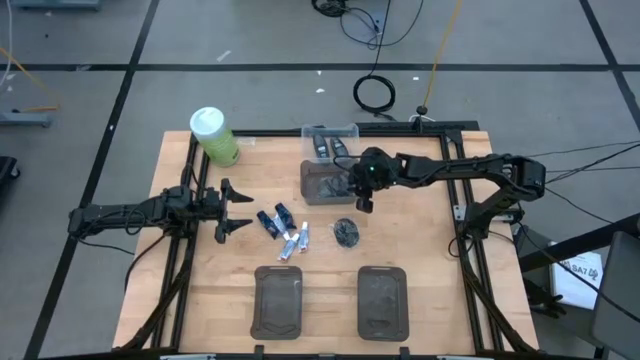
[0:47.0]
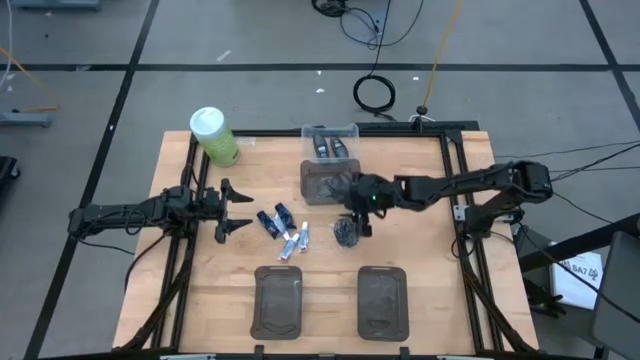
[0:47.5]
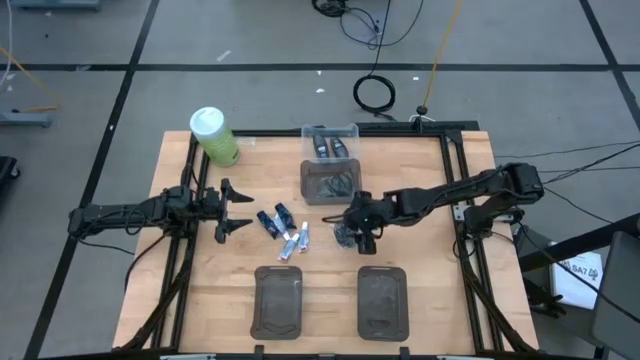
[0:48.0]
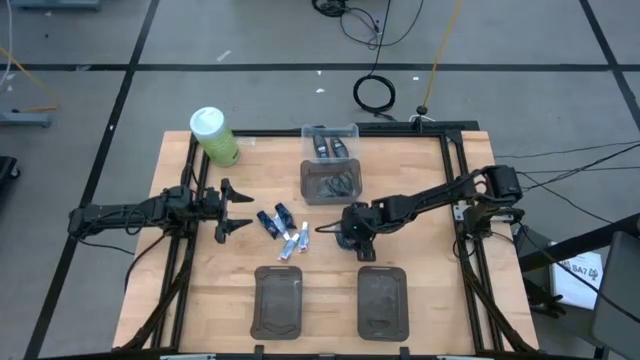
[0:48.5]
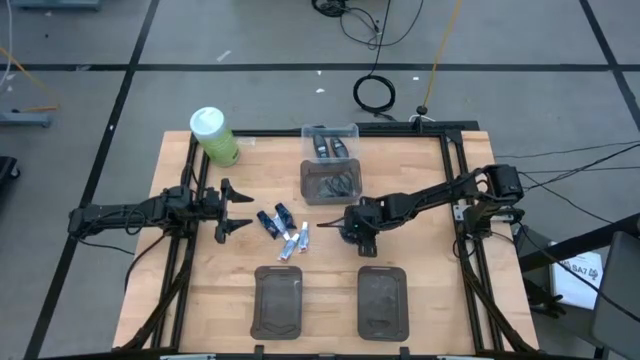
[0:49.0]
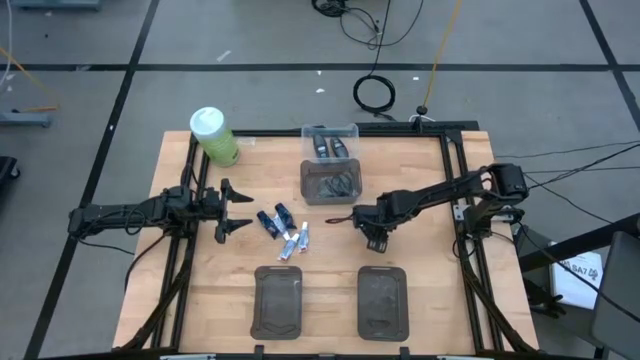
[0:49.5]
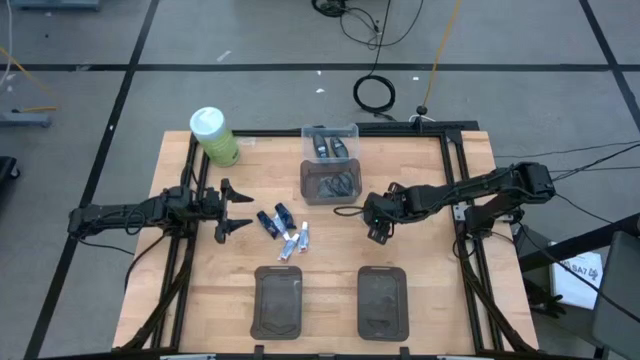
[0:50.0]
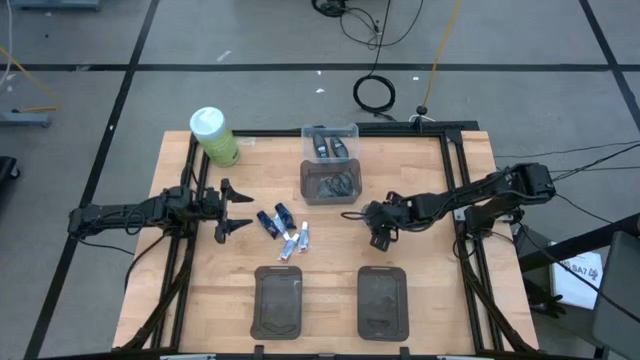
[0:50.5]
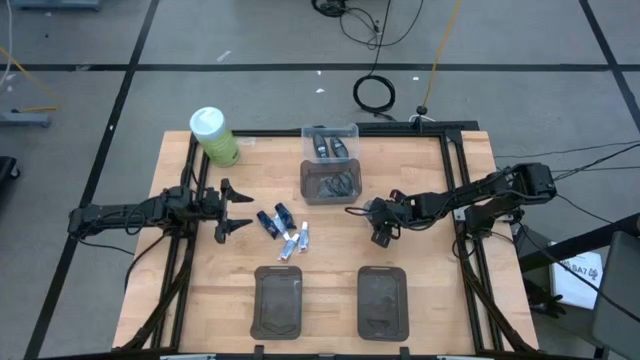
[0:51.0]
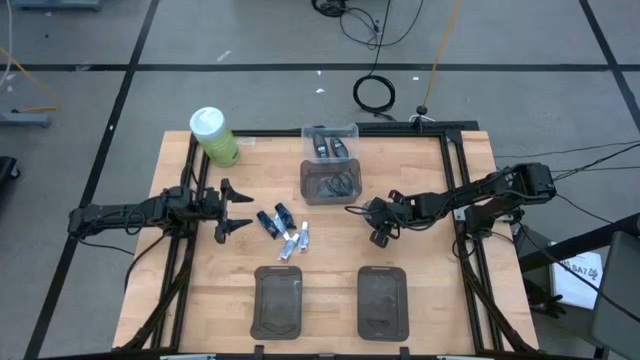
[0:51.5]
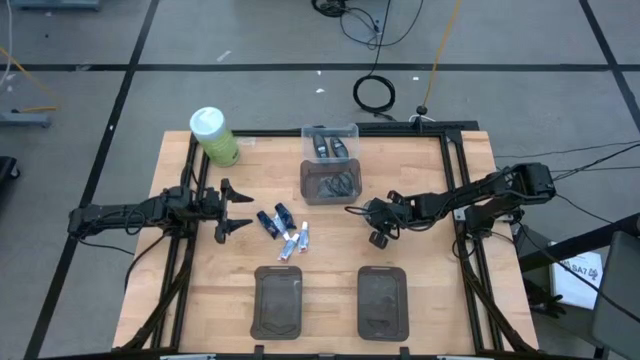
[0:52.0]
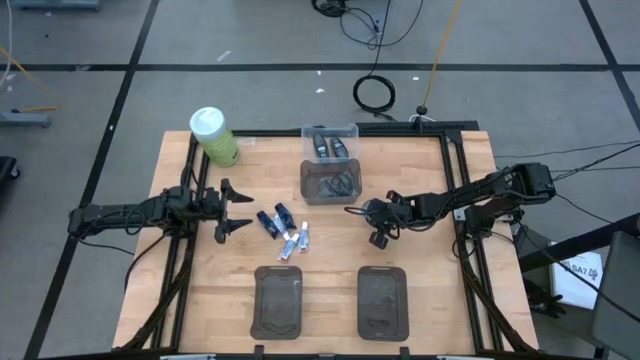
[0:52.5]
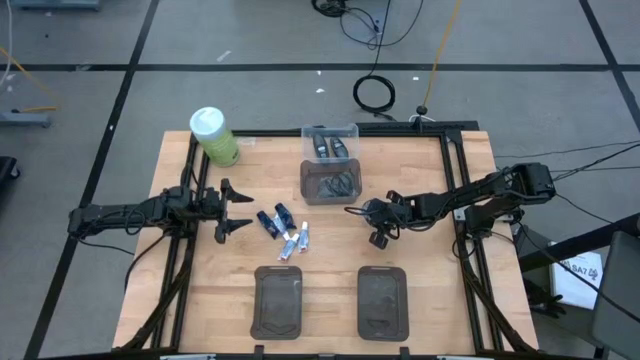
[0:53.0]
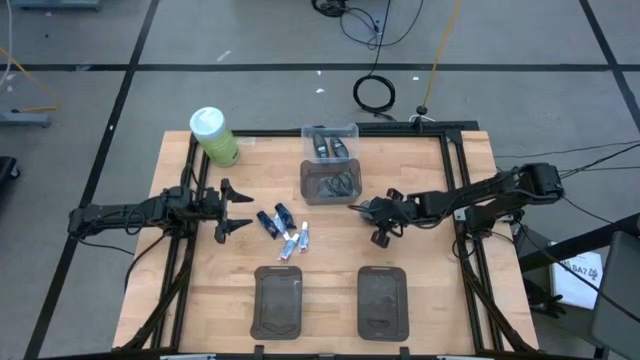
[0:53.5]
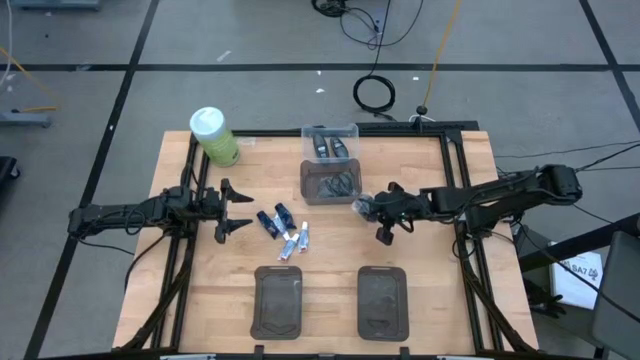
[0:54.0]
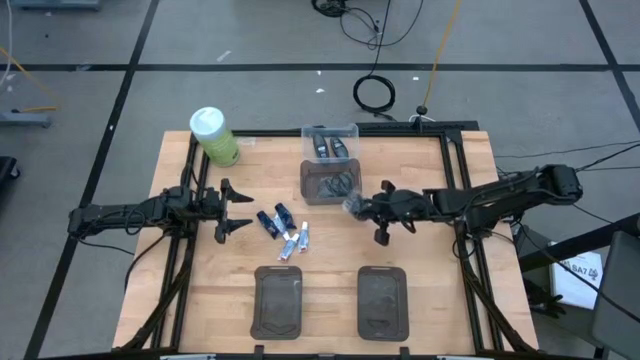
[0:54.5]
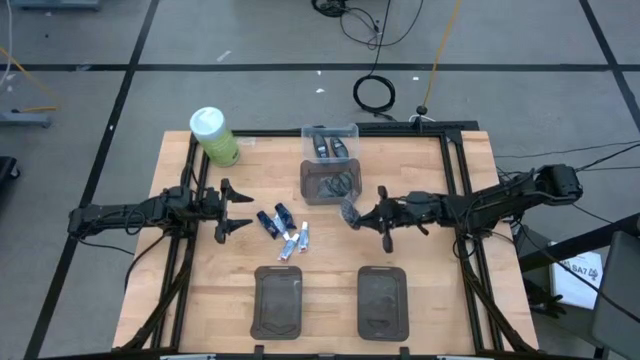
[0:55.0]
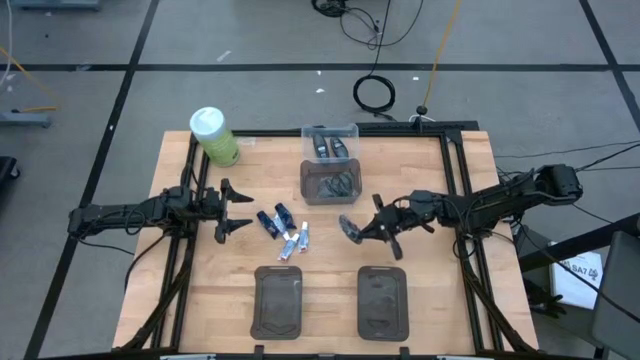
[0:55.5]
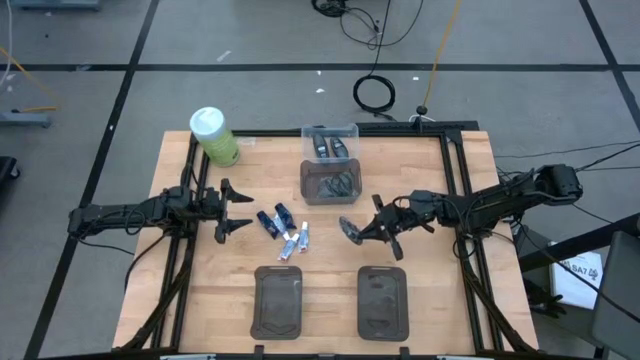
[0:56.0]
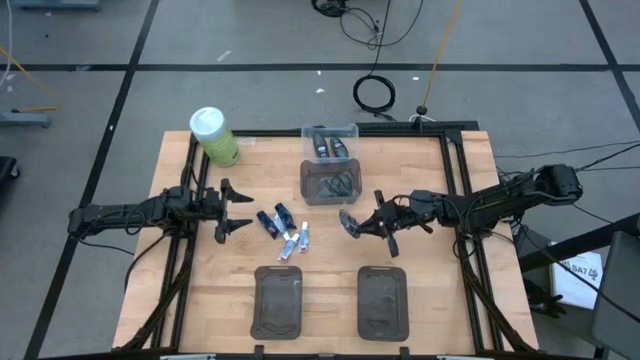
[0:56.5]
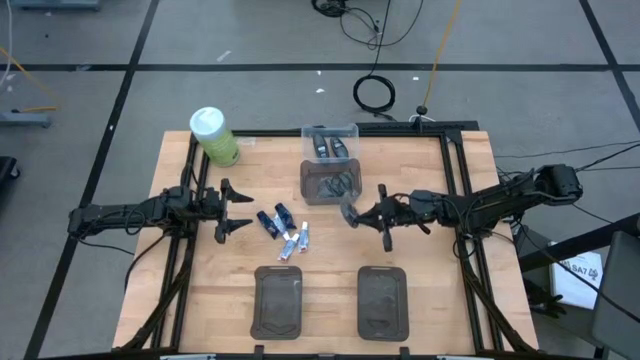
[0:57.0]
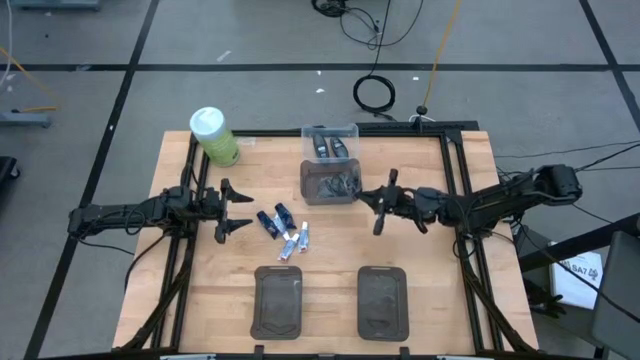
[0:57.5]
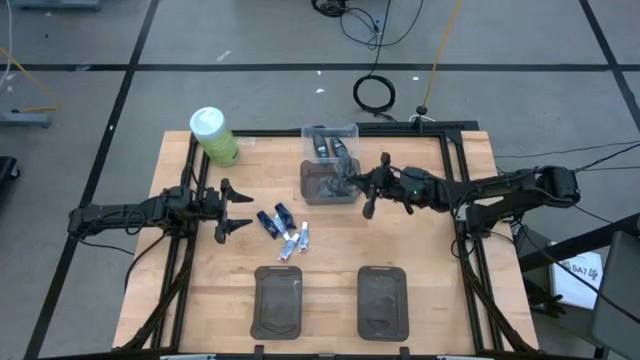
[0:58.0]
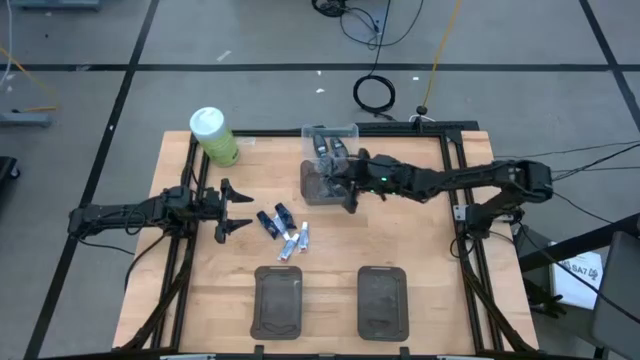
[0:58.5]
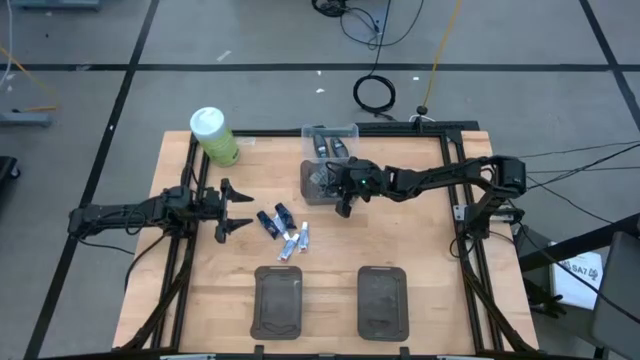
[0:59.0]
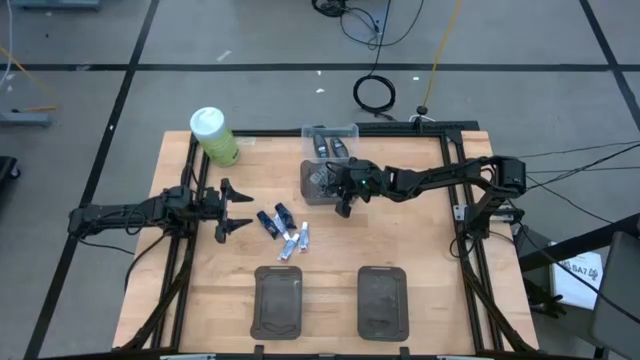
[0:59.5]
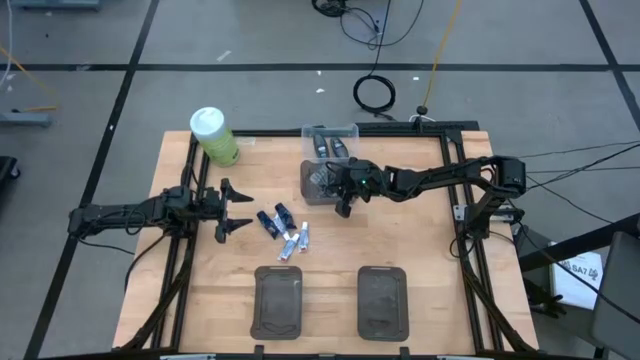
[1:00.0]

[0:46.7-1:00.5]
Task: Pick & Place Travel size toiletries
Put the black hairbrush into the top black bin

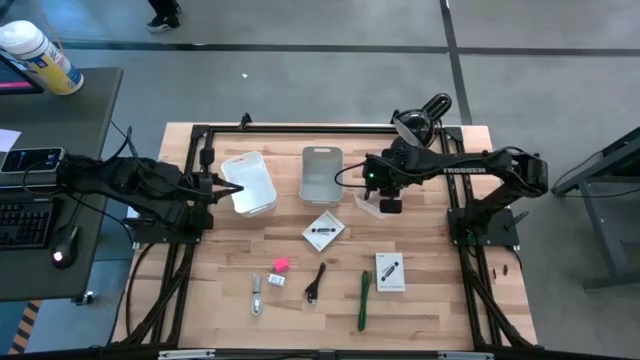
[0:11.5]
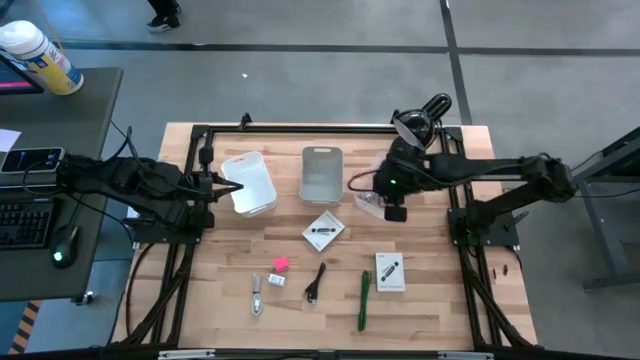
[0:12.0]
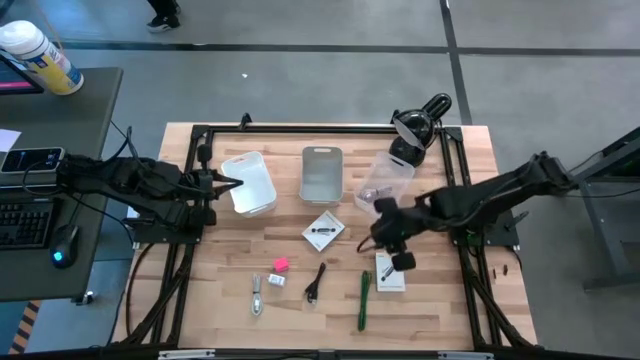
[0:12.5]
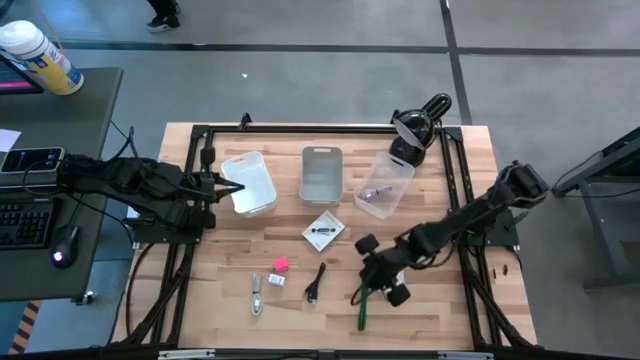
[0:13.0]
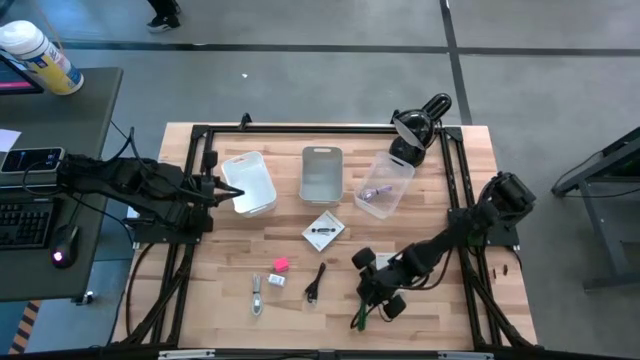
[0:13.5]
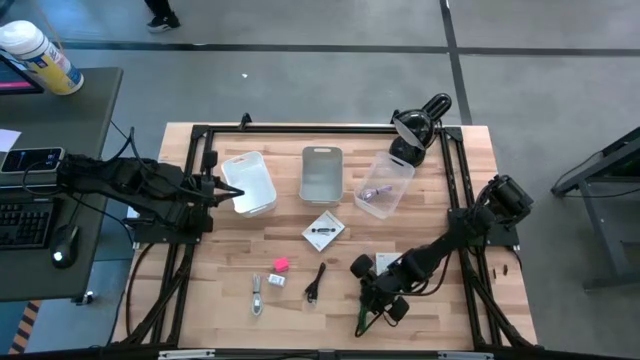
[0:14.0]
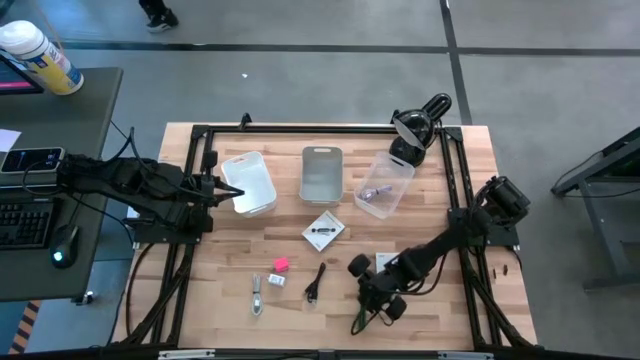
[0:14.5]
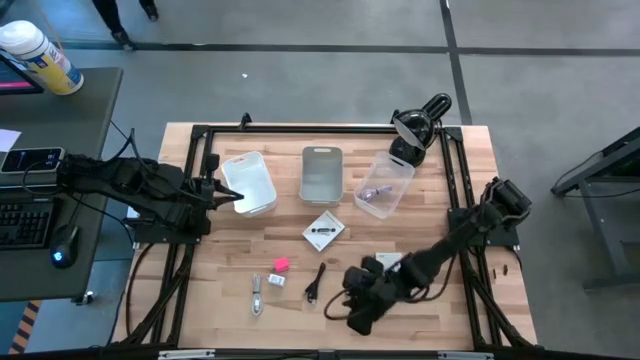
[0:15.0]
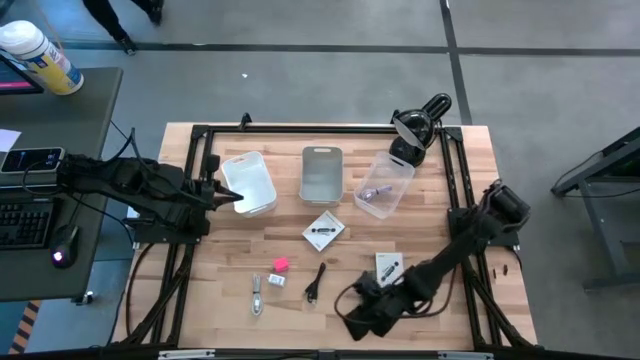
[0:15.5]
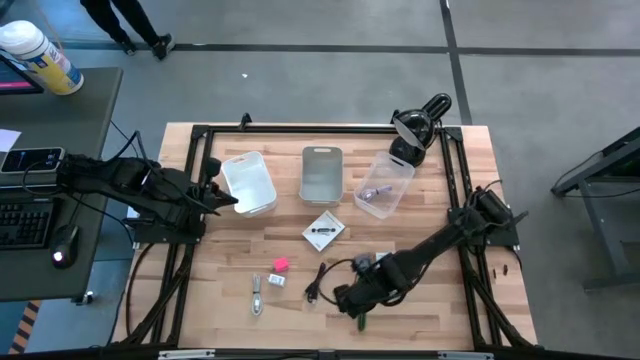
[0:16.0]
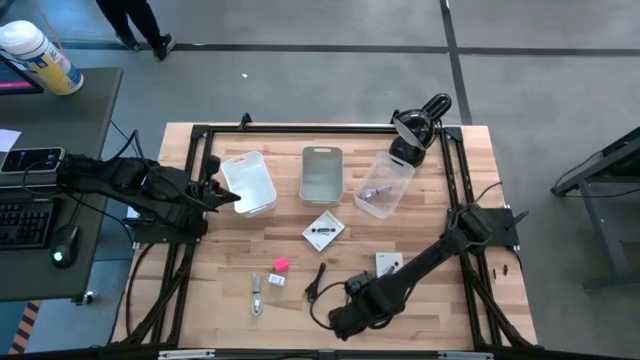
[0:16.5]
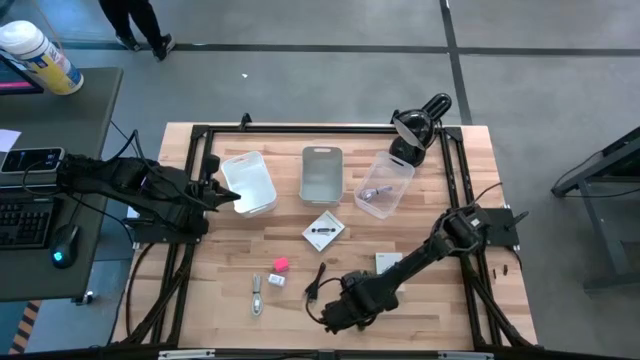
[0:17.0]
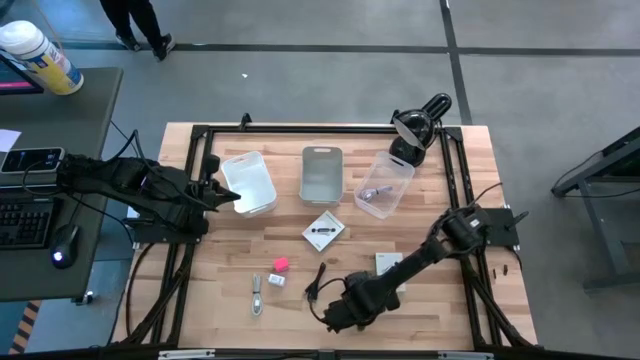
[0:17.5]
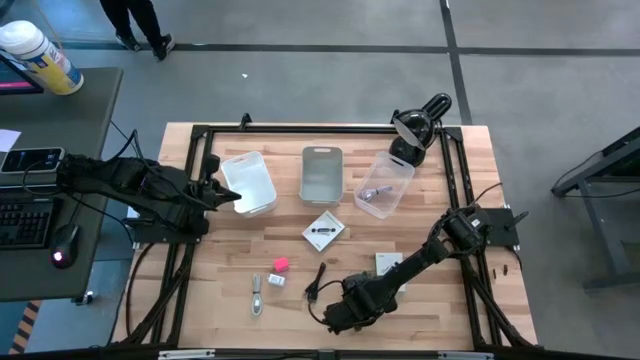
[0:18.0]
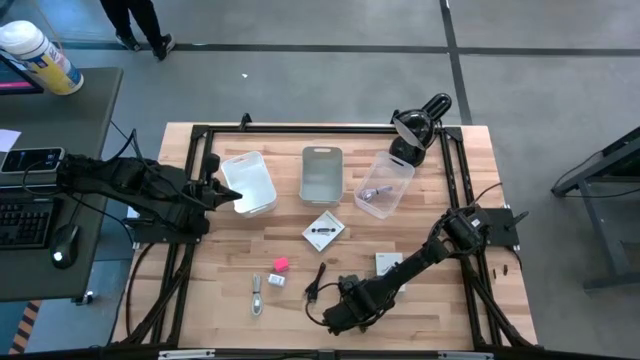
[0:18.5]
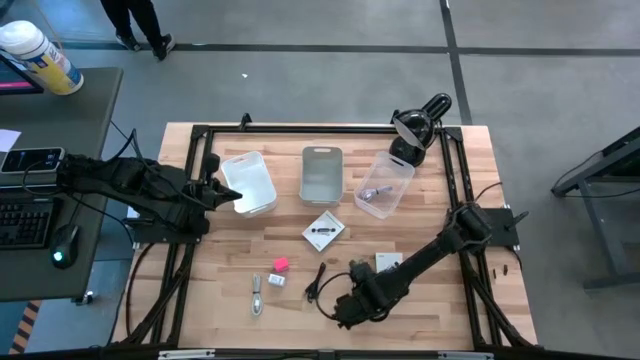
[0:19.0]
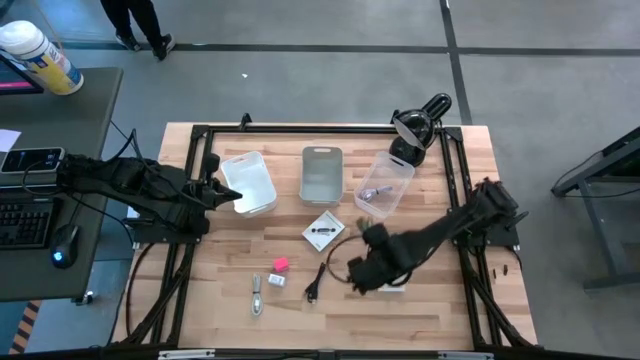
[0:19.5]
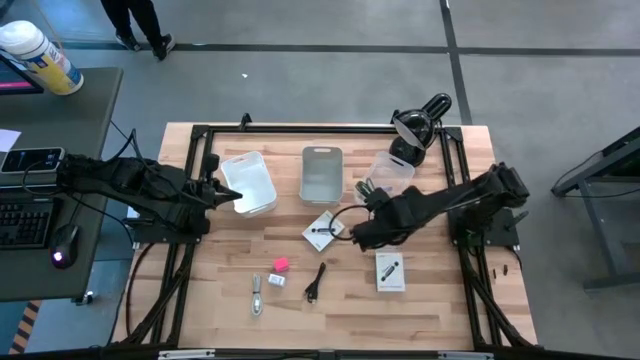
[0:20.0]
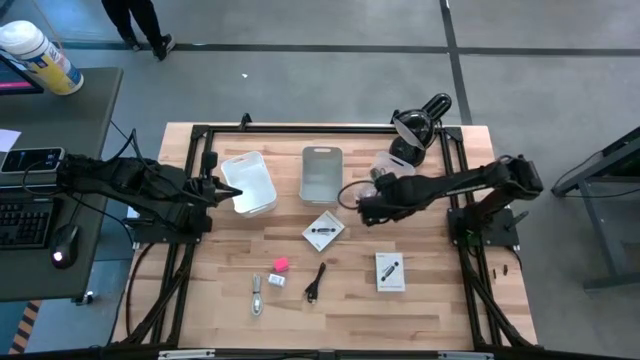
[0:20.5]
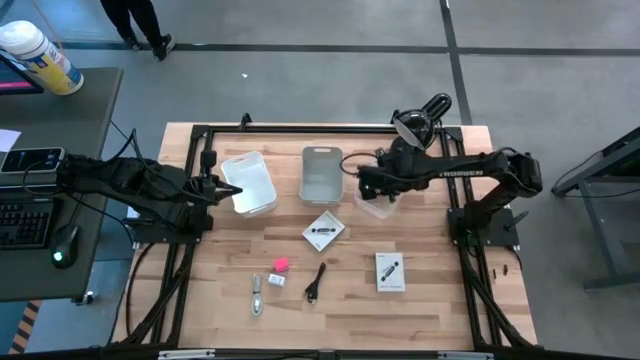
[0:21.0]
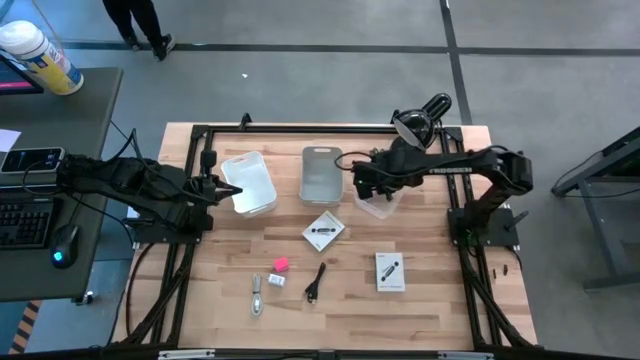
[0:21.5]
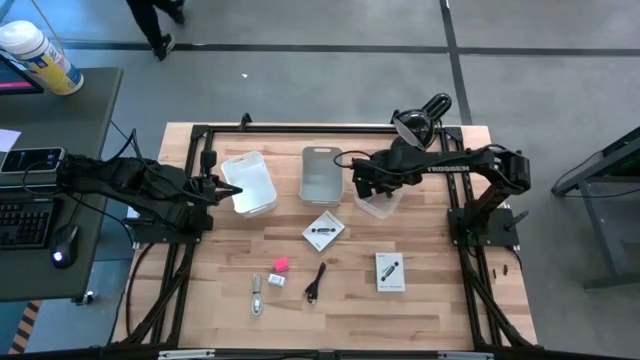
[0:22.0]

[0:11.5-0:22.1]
Task: Pick and place items into bin
Put the green charger cable into the transparent bin
